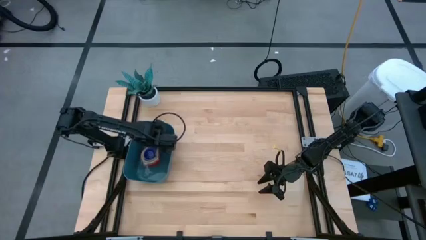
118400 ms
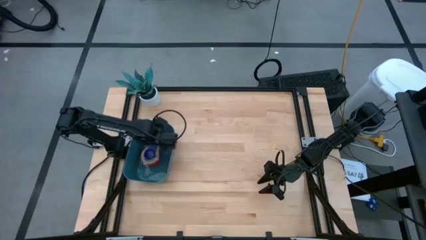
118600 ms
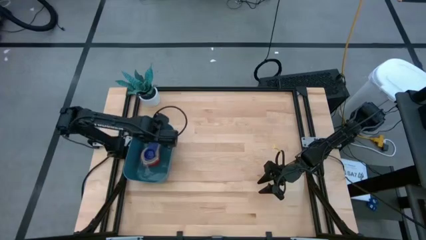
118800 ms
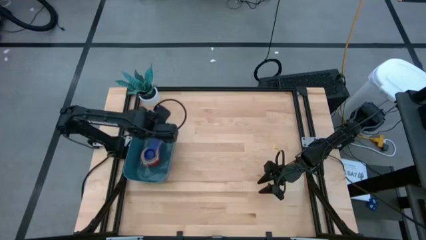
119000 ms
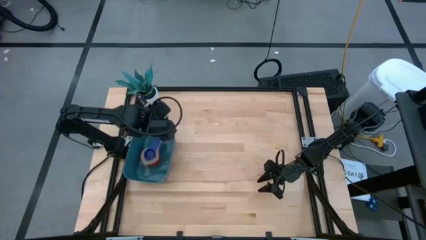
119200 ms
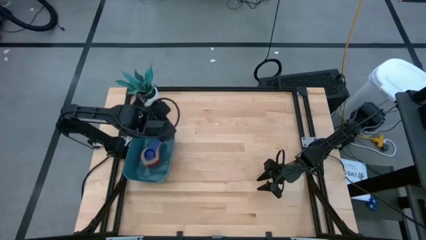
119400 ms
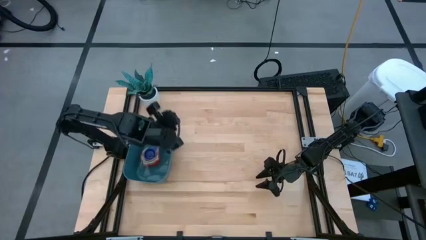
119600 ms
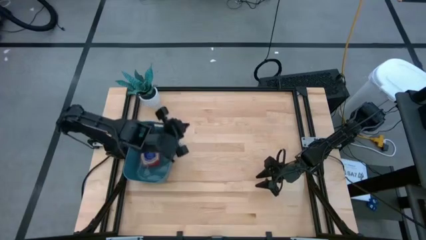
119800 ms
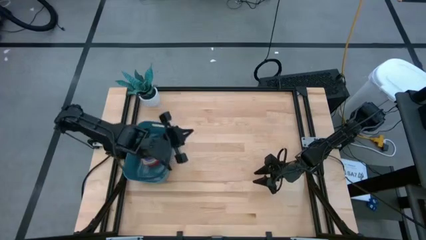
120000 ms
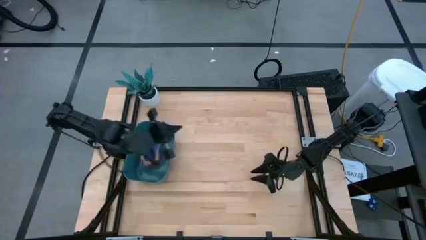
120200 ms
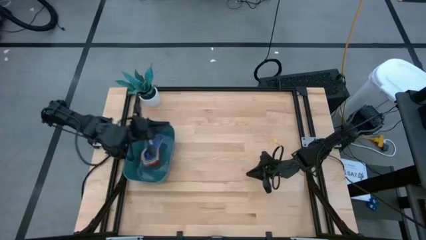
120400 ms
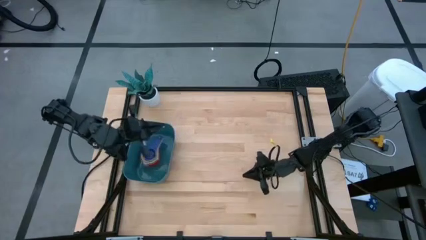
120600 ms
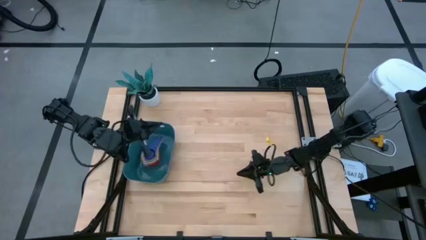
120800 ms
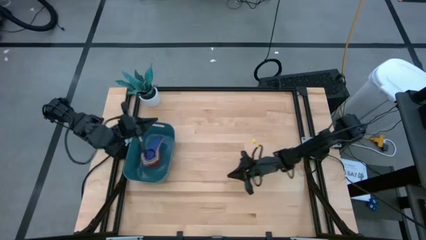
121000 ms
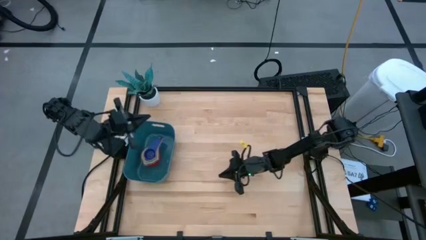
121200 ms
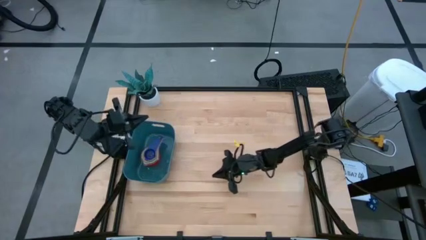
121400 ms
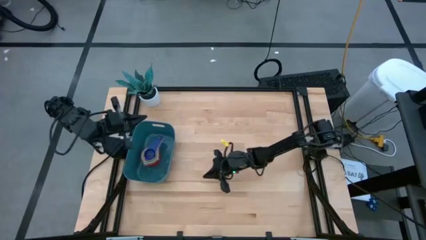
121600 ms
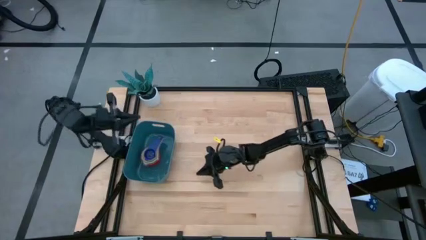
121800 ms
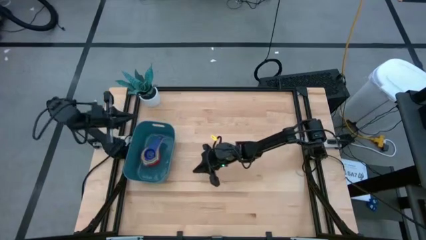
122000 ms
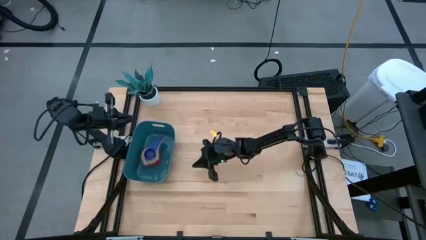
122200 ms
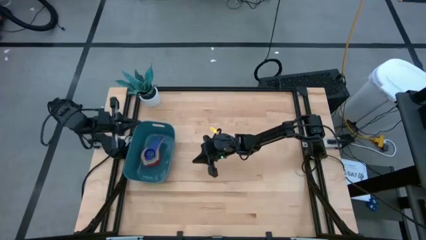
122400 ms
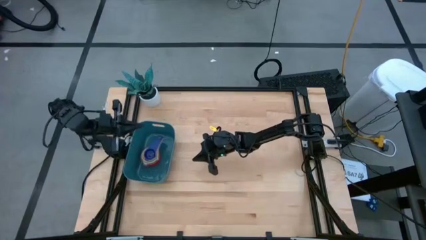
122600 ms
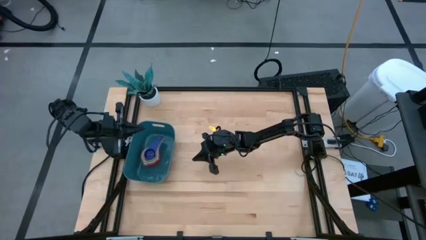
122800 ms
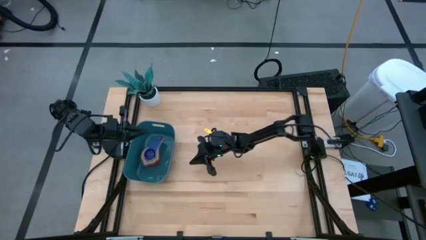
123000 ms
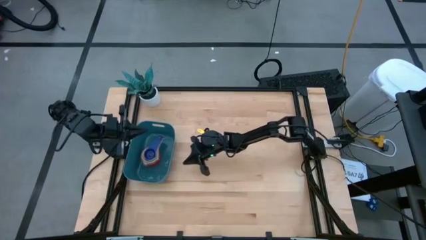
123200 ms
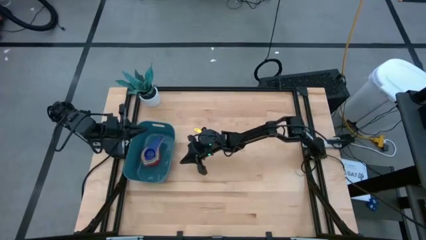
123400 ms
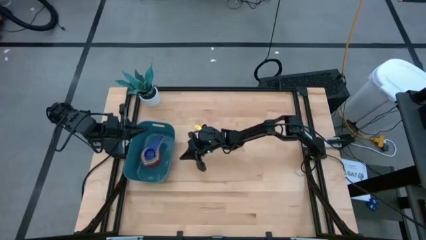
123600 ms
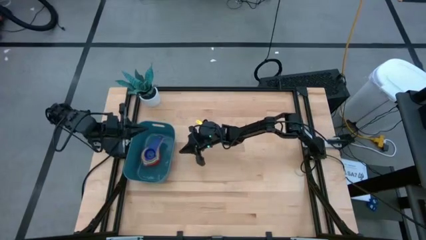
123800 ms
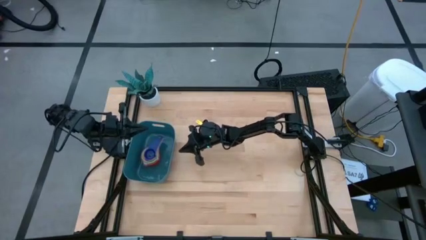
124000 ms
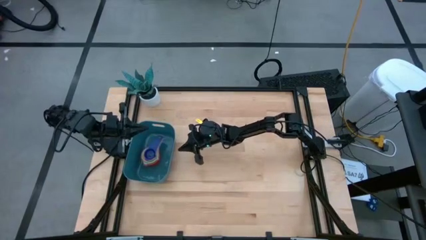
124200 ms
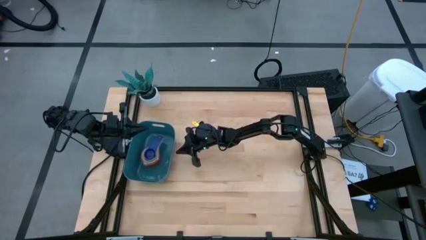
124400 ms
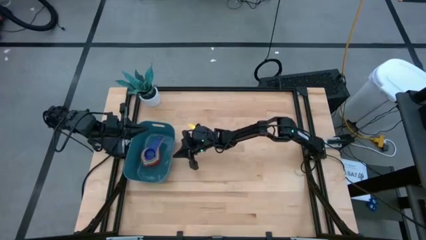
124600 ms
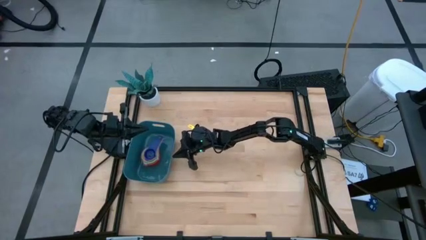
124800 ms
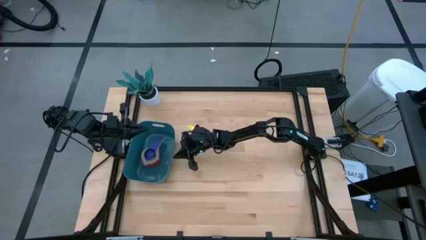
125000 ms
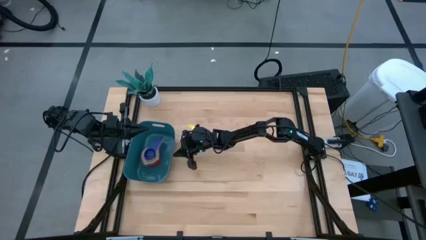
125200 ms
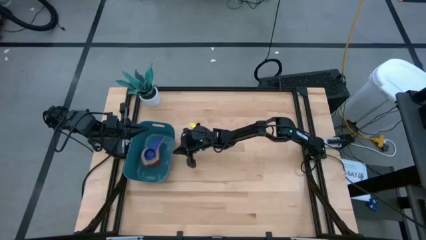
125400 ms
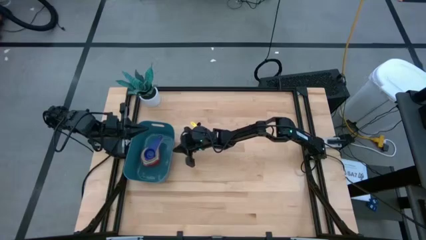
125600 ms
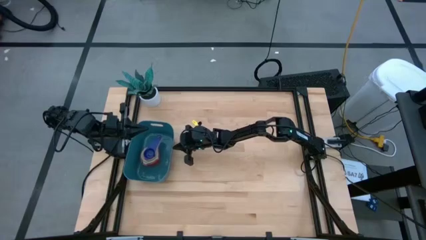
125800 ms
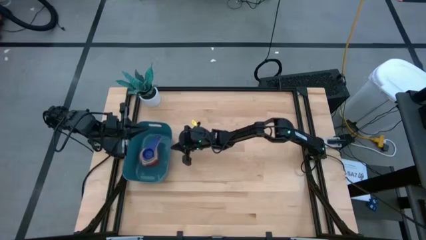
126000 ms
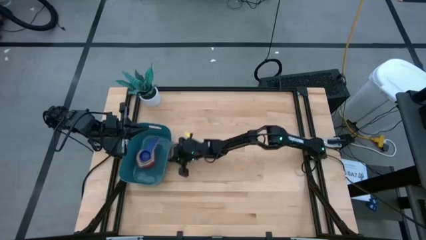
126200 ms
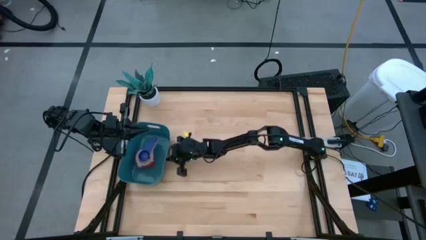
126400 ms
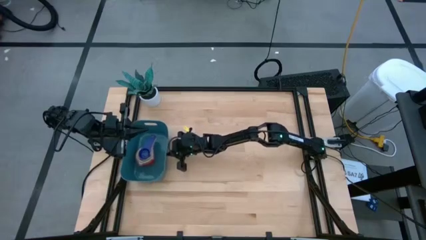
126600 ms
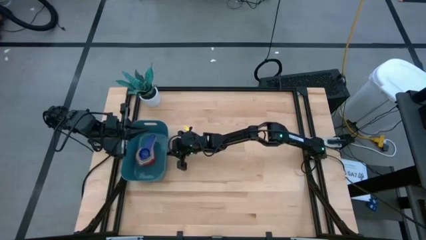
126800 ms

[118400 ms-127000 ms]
Task: Nest measuring cups in basket
Adjust the blue bin

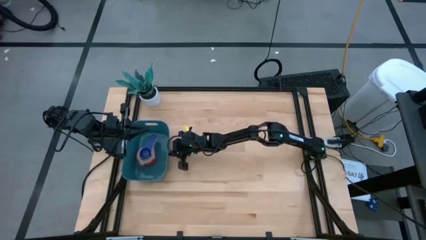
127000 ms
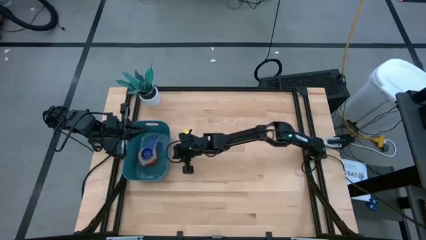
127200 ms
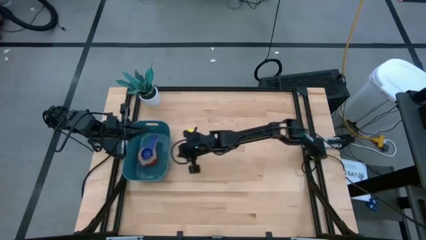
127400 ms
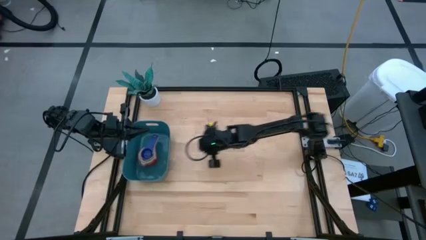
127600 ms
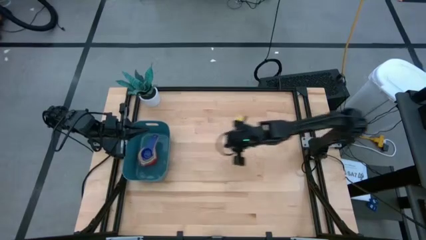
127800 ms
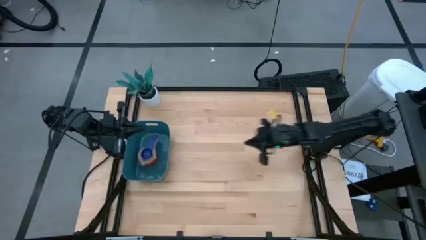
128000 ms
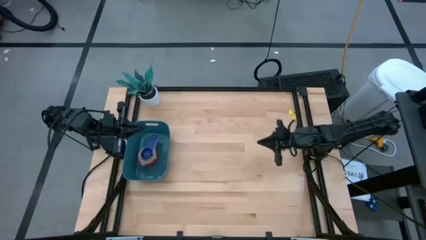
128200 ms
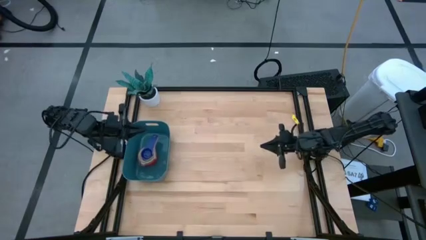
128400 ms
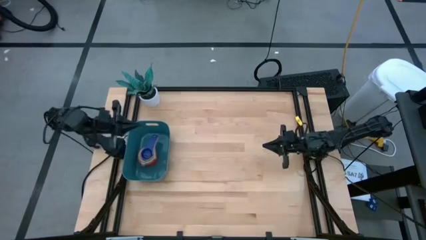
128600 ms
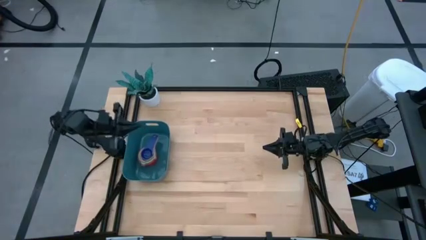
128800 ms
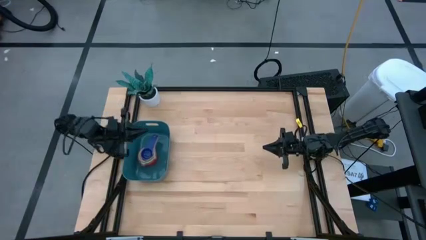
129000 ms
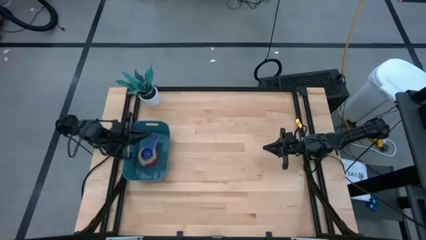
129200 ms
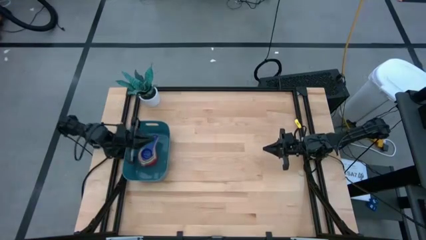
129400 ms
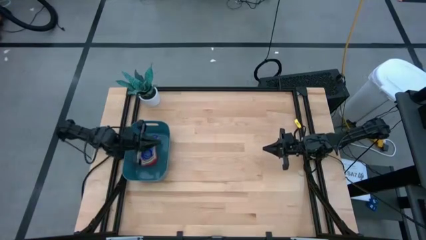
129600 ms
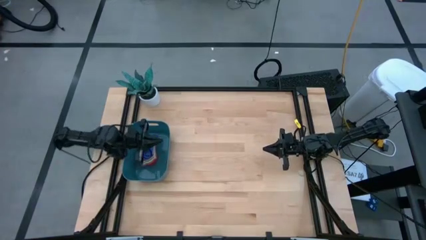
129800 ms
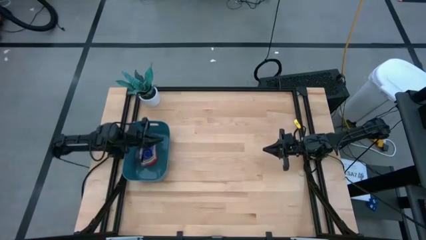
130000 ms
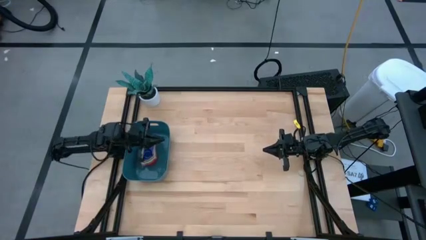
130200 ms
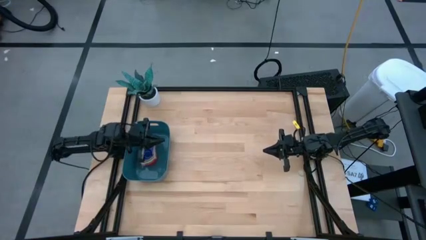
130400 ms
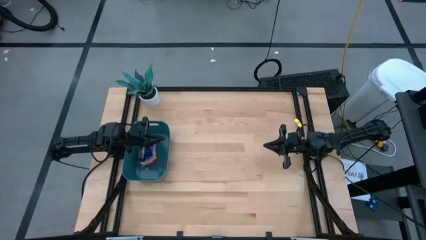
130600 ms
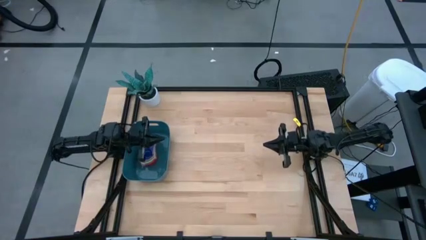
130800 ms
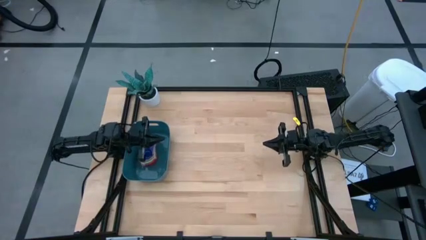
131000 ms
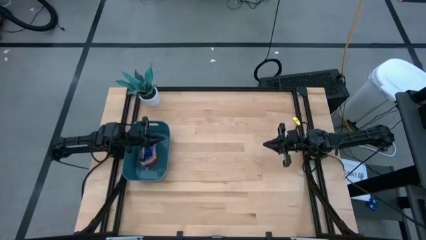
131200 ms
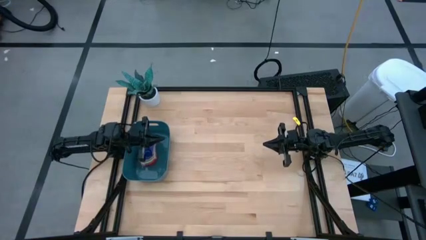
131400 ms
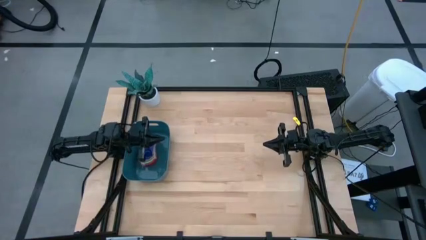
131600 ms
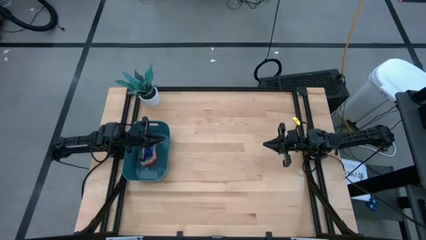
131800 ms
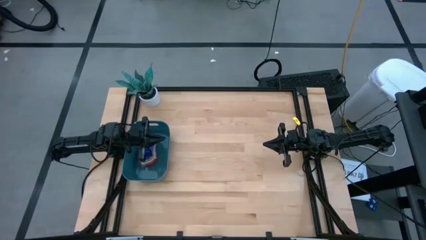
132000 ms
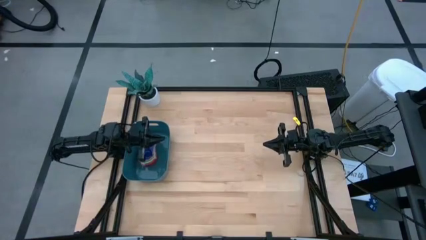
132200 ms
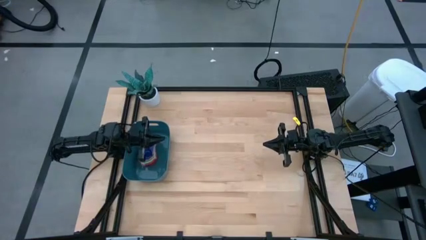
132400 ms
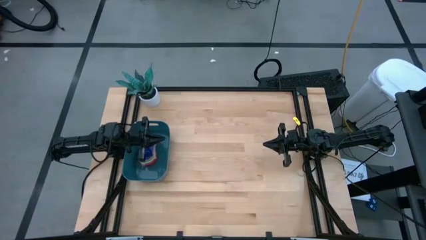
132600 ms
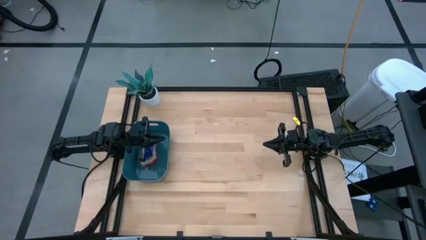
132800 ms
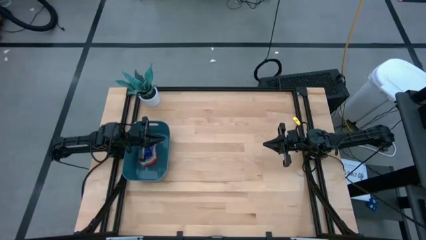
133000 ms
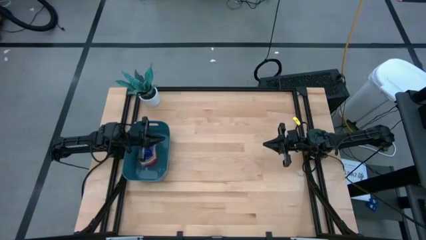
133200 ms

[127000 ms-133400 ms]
Return to Home Position

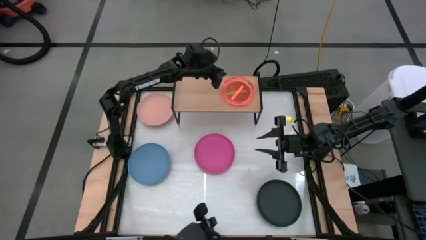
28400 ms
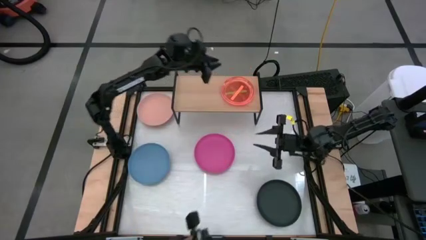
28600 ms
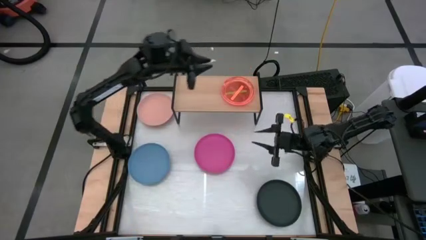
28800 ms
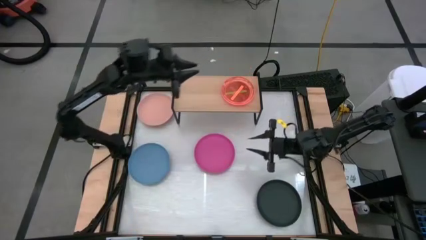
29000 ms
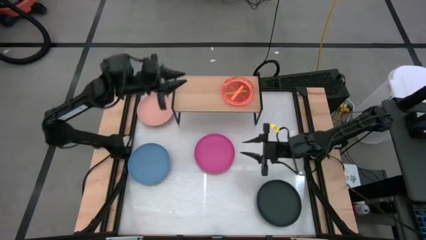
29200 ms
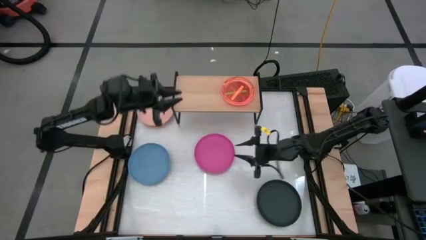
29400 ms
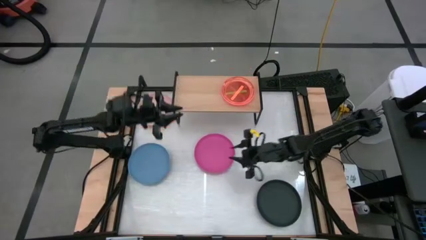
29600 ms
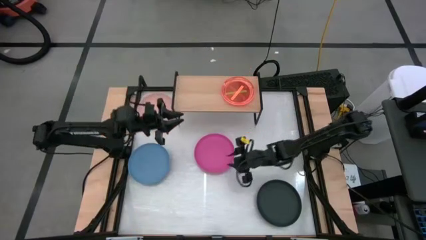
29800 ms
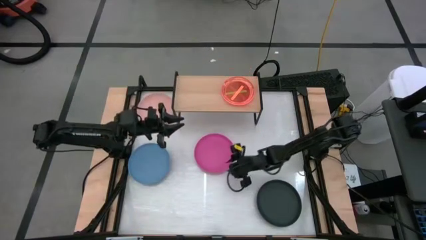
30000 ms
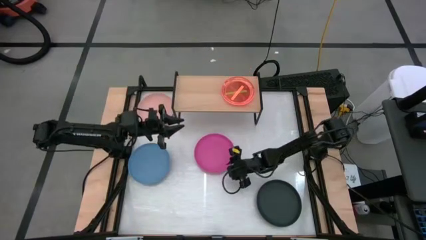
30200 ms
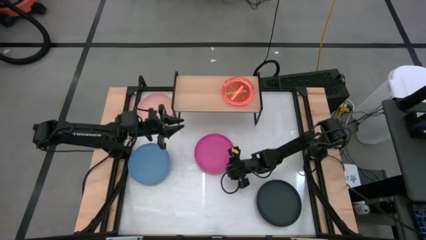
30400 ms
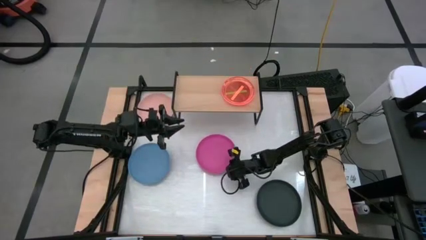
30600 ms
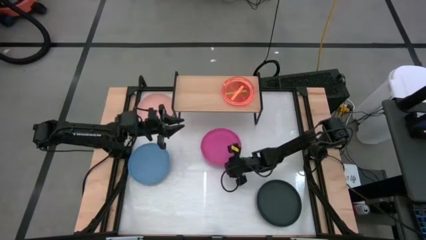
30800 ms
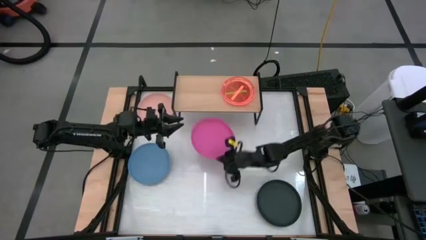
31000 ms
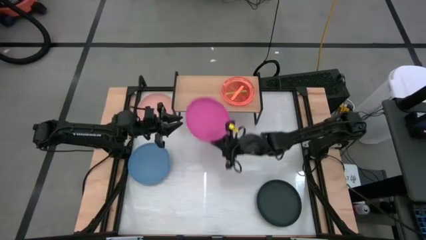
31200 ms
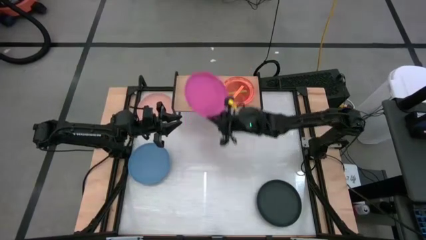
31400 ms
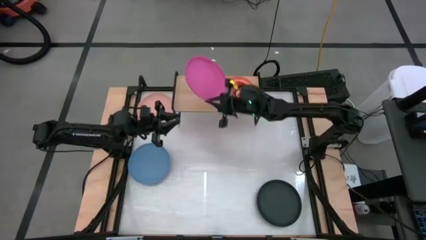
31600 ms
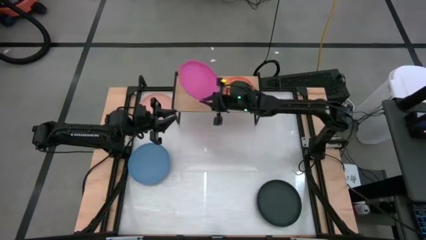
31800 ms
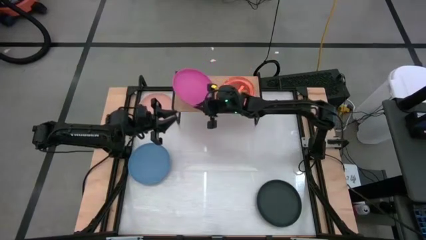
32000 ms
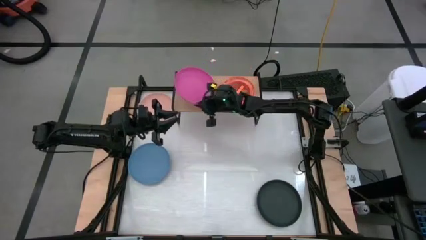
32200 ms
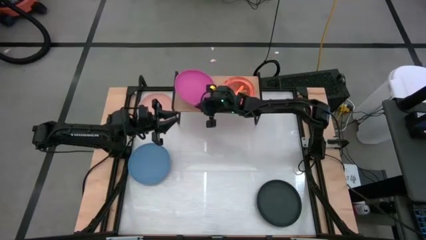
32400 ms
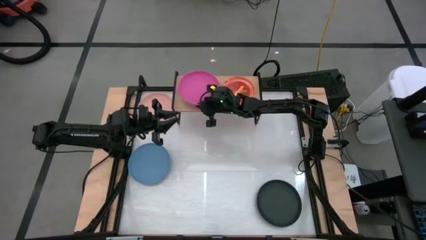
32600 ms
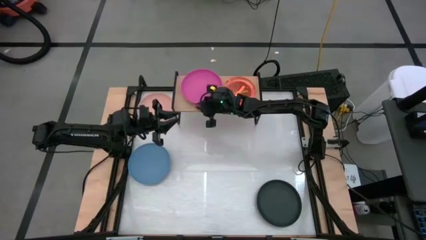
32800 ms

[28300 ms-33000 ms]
Task: Place and stack plates onto a shelf
Put the pink plate on the shelf
